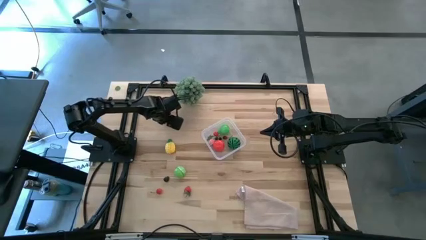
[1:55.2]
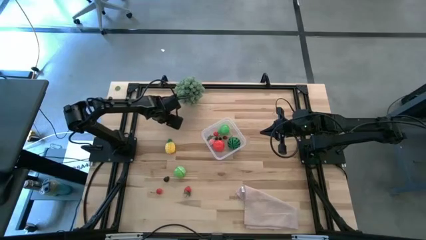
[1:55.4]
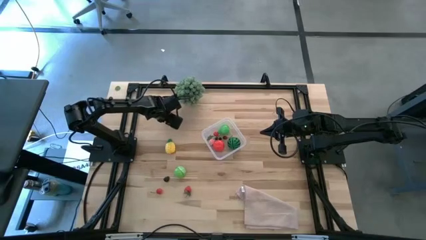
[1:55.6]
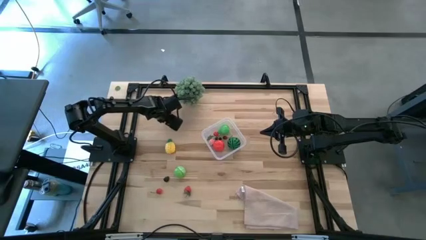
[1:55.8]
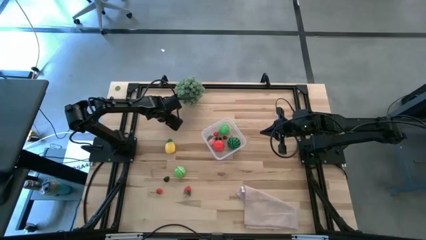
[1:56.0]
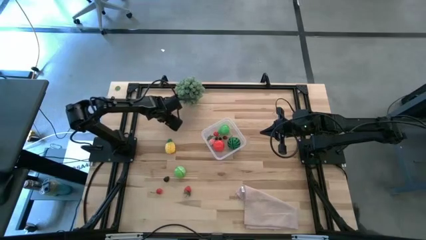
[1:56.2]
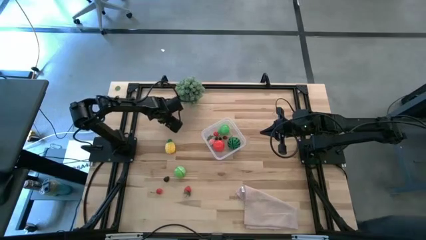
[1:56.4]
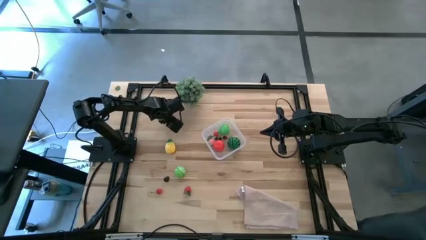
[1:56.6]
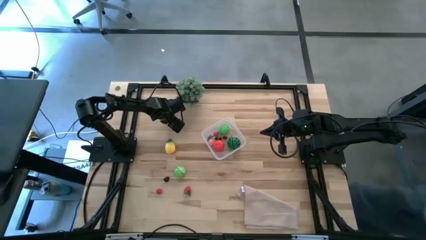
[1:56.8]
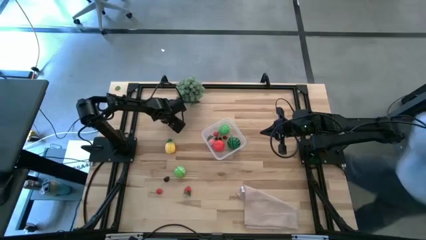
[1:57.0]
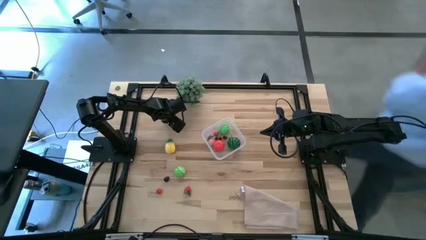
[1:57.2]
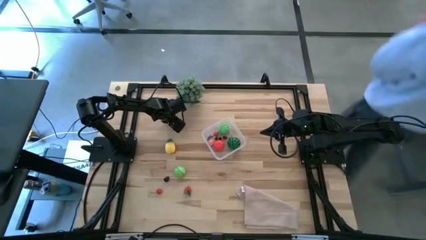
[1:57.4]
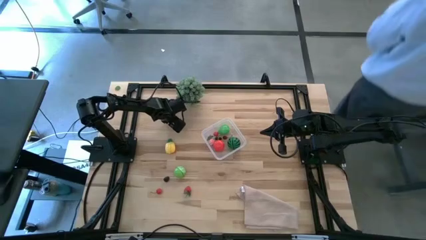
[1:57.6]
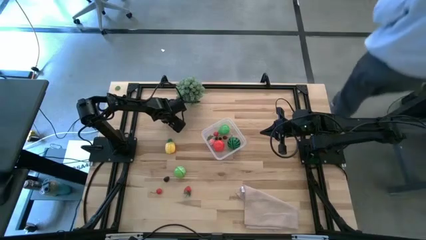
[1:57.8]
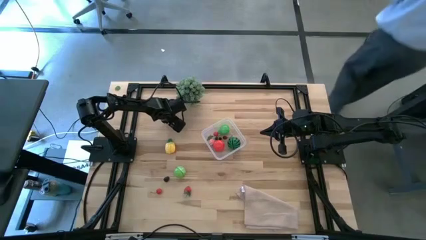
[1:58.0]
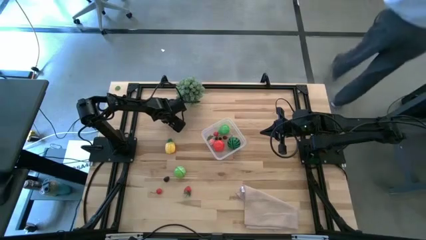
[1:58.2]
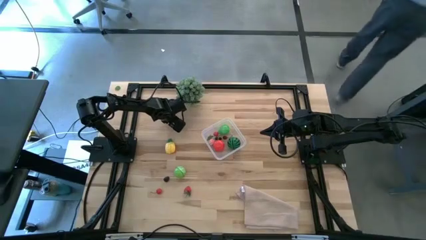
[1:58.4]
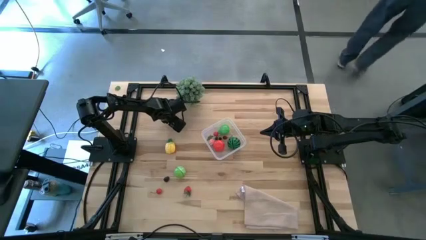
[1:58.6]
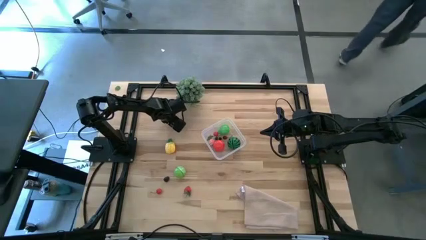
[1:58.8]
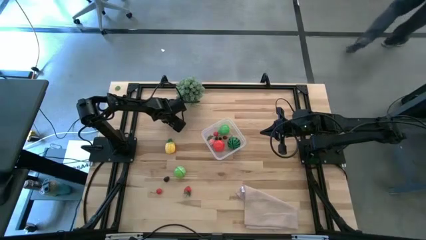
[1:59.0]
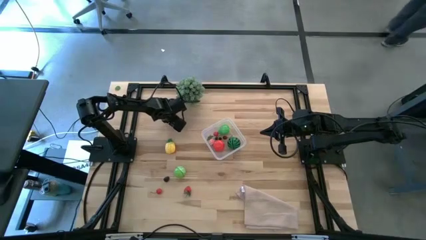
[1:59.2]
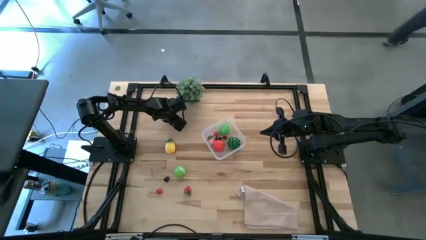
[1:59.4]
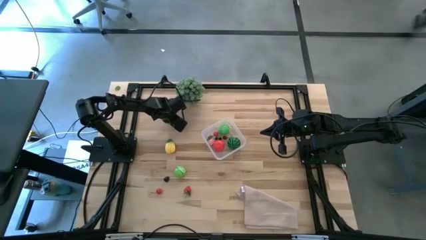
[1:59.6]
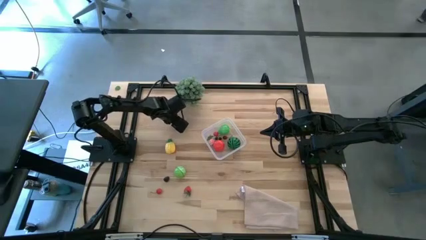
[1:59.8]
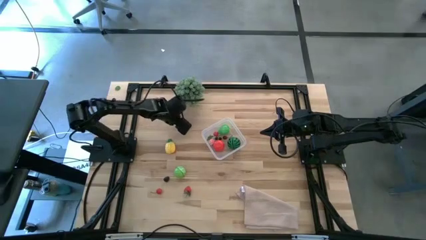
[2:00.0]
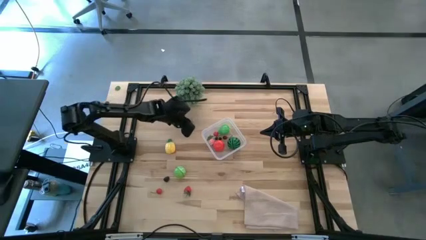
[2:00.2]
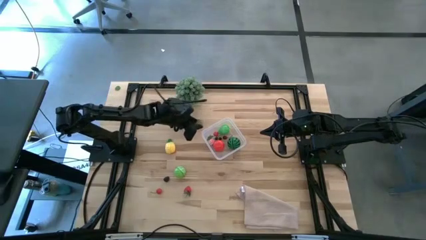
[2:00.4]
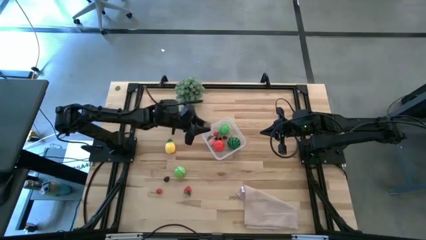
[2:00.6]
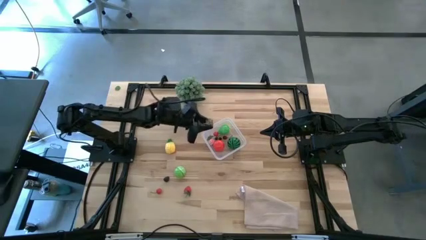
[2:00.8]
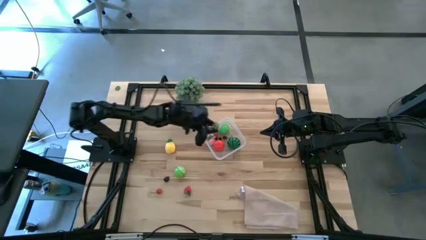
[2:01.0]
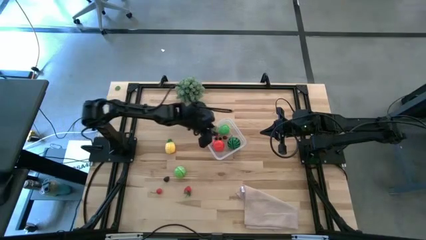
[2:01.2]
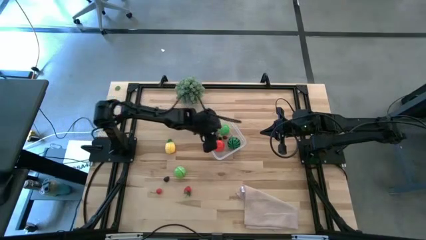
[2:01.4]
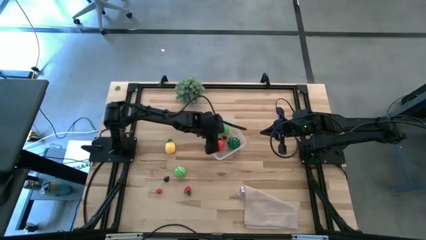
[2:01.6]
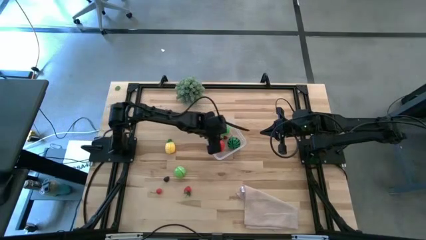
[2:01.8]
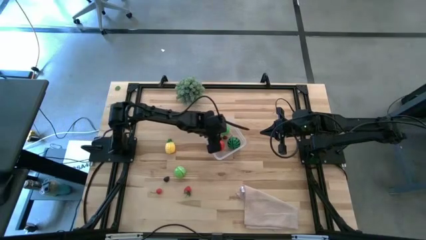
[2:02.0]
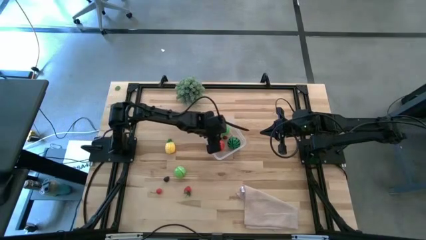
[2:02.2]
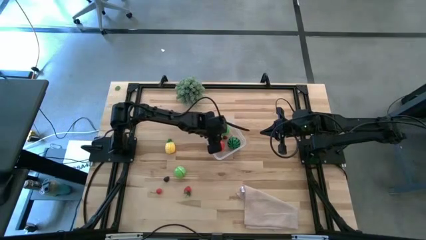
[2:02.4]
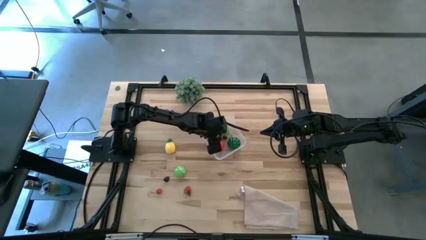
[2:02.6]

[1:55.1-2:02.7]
Task: Pick and placing Produce into tupperware
Put the red strawberry into the transparent bin

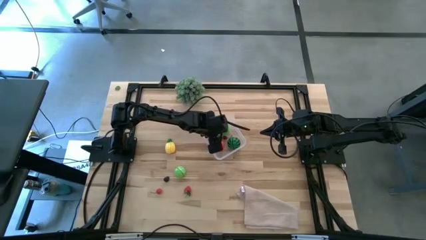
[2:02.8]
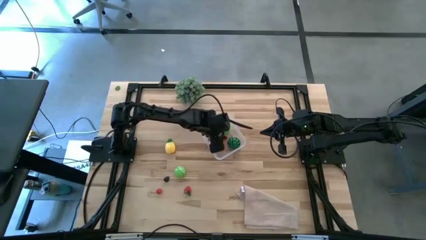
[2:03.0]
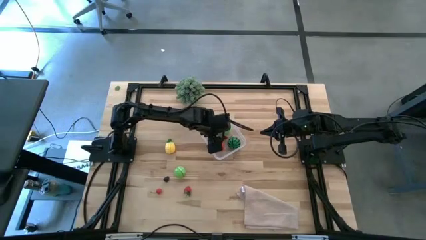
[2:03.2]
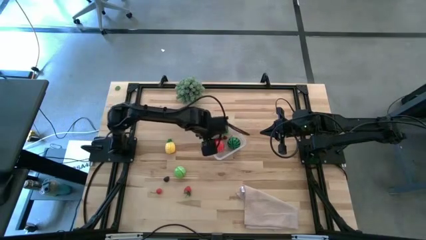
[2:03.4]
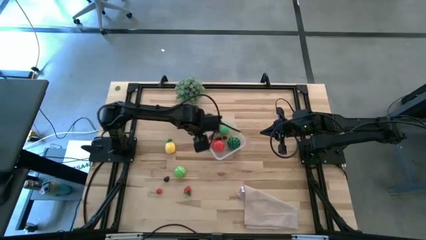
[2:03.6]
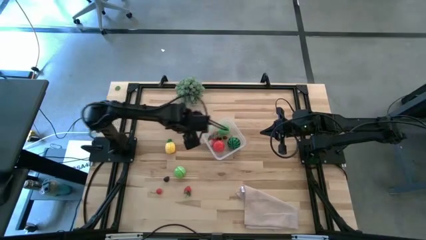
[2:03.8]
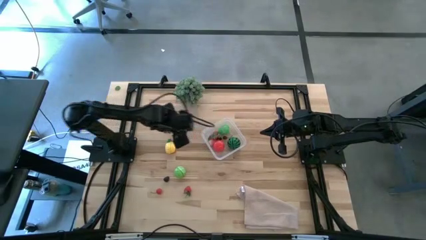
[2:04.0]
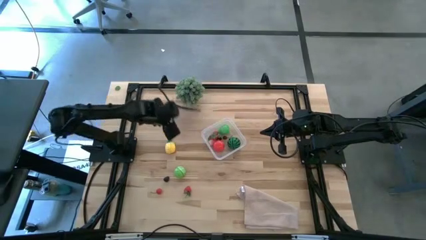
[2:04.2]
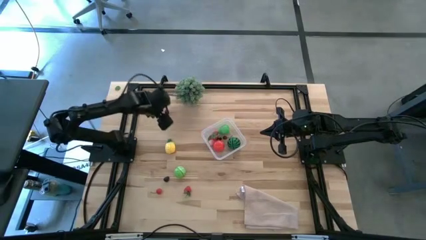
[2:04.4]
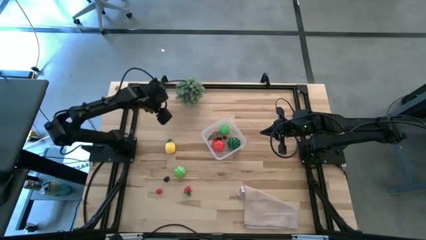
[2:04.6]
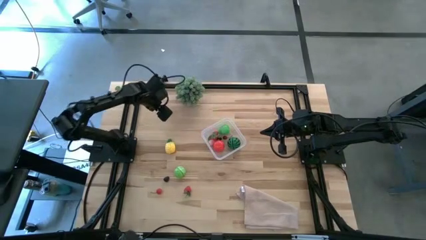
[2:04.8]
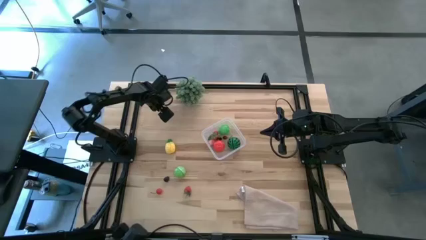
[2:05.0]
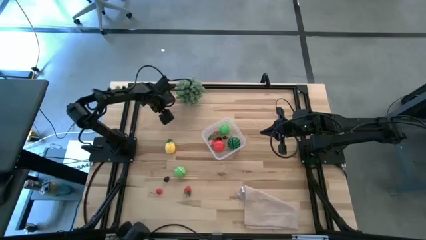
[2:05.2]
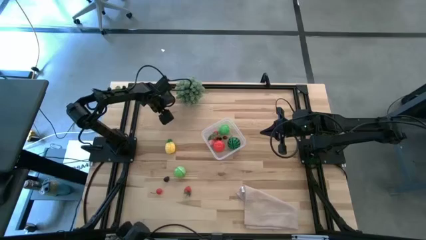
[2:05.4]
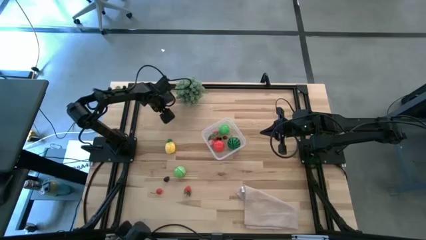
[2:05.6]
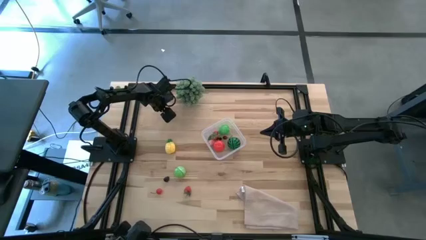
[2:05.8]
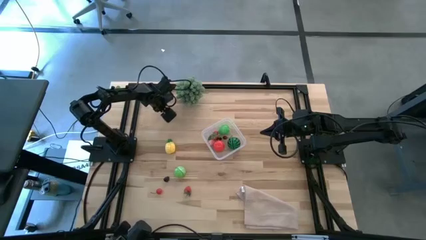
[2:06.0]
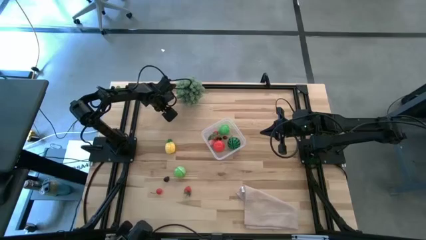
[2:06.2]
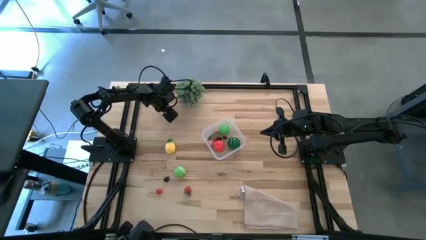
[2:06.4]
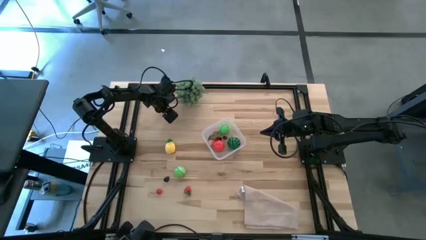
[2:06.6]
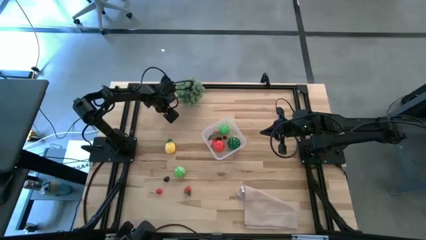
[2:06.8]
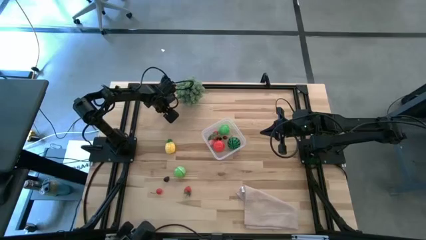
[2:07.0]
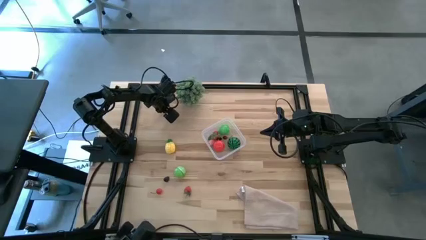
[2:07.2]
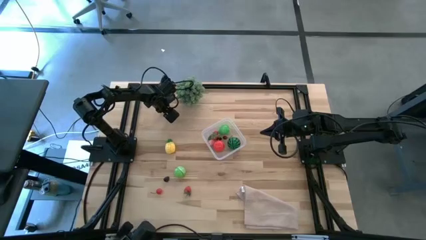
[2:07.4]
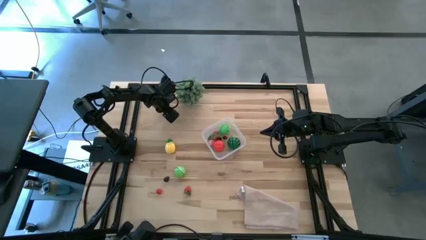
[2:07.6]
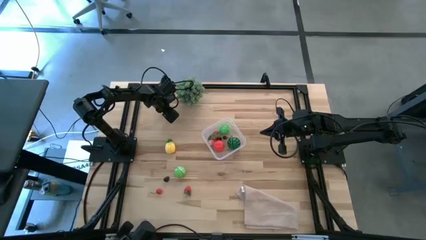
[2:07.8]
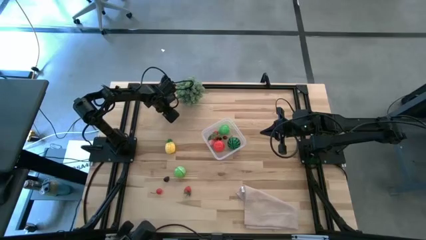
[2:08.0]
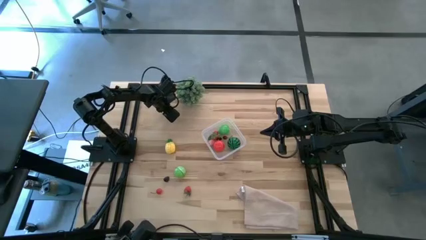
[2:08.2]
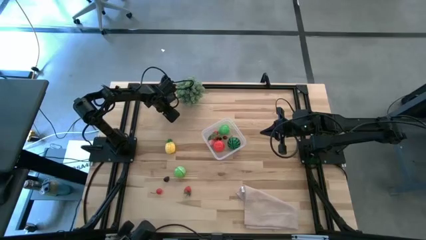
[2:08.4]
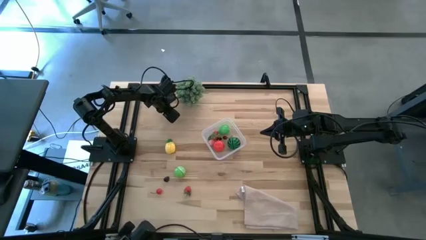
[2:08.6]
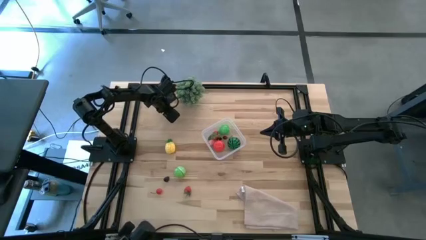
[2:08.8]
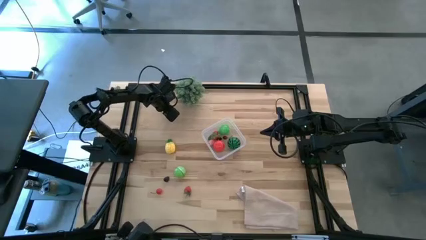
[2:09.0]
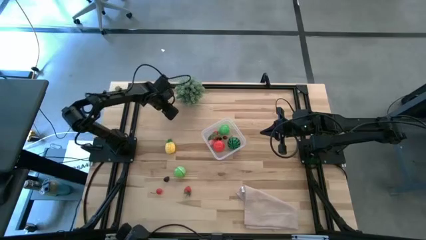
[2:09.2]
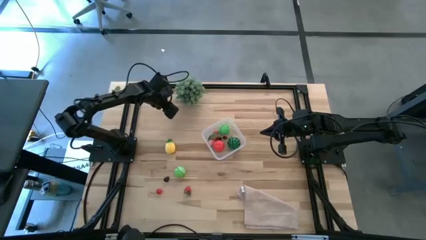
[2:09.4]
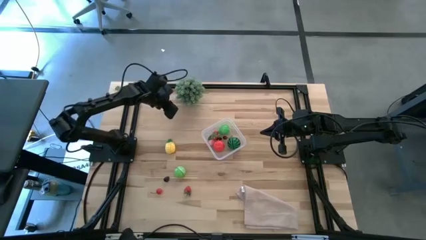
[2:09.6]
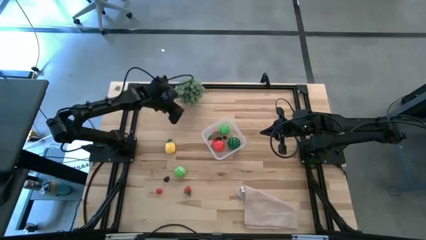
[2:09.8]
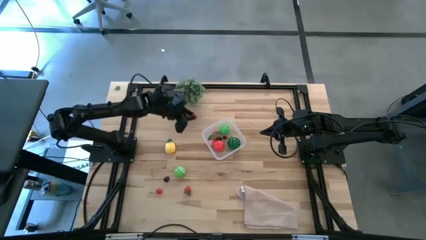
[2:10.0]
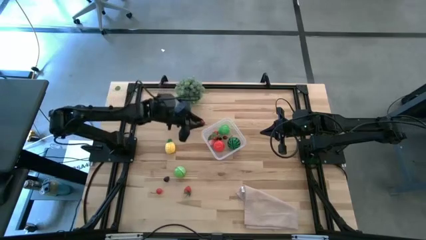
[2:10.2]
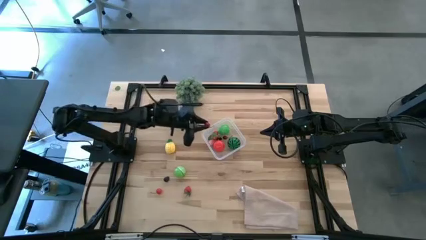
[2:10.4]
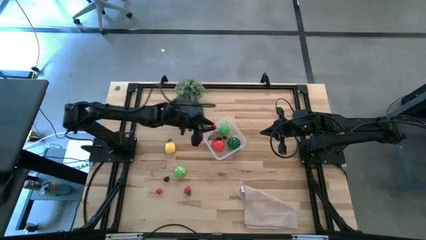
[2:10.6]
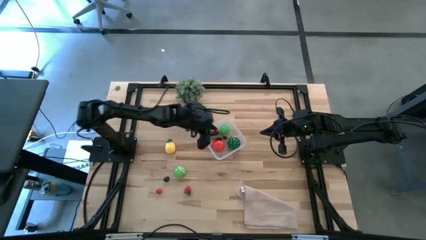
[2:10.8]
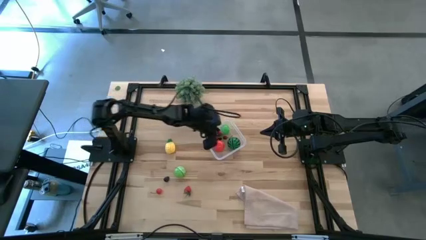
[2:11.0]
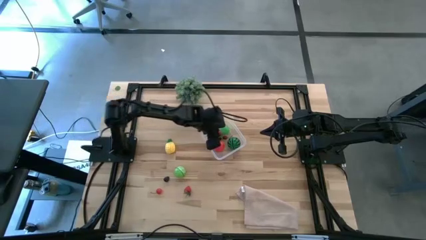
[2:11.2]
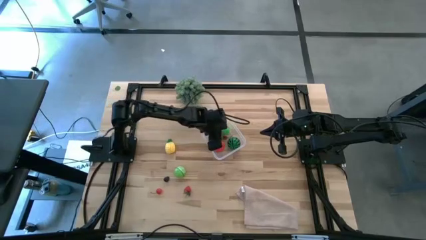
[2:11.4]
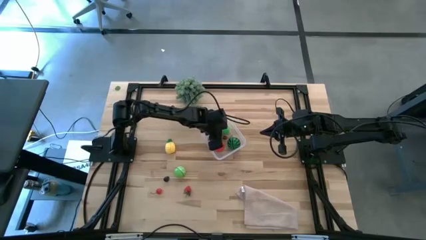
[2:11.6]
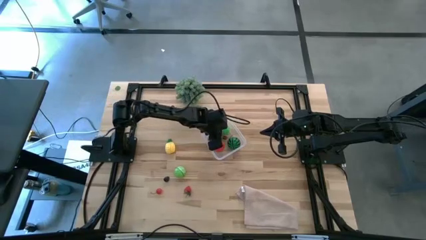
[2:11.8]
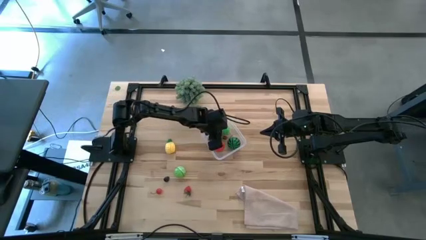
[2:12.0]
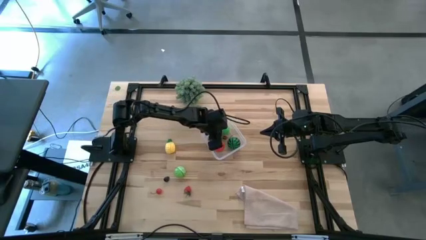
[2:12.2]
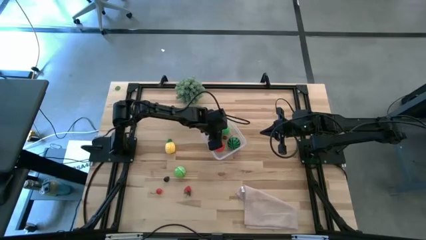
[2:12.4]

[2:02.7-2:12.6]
Put the red cherry into the transparent bin
